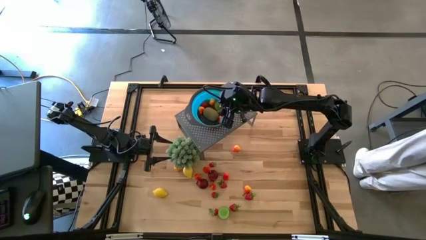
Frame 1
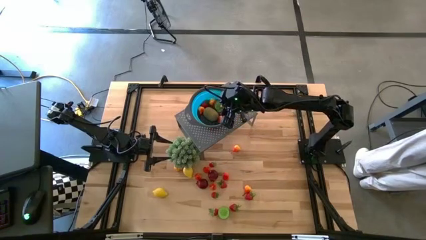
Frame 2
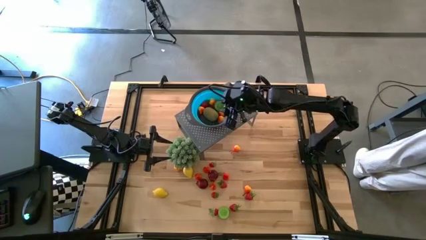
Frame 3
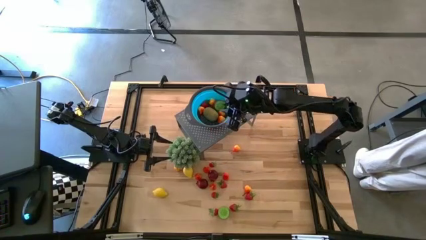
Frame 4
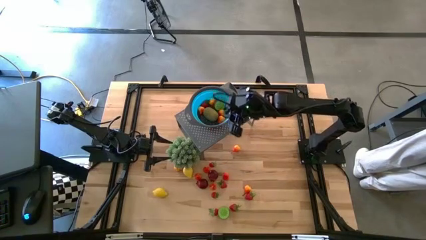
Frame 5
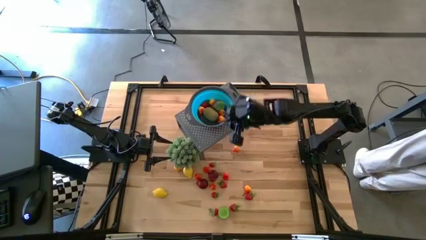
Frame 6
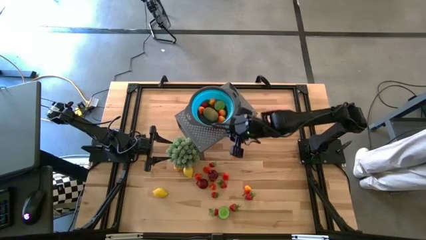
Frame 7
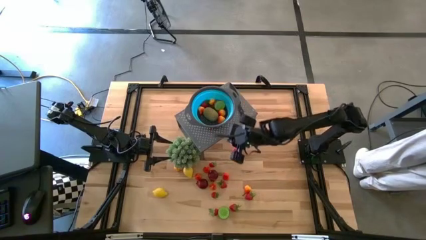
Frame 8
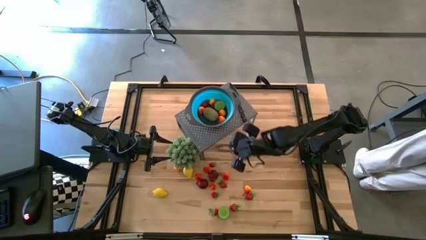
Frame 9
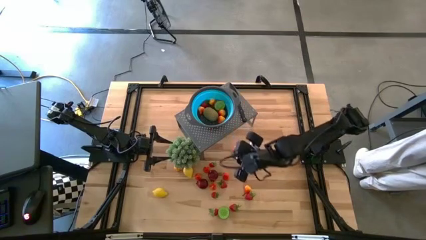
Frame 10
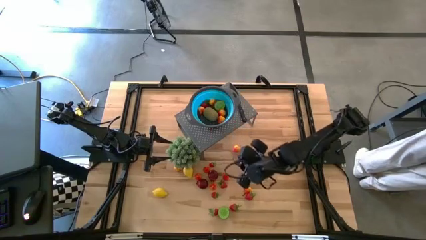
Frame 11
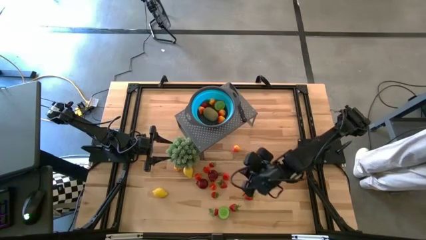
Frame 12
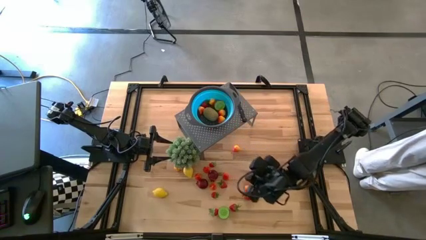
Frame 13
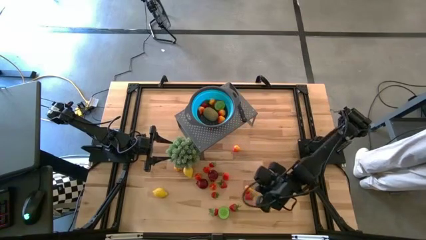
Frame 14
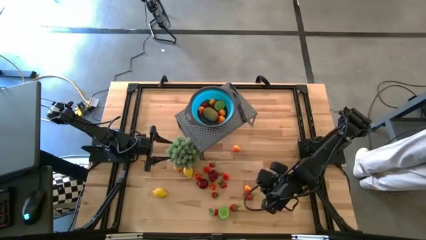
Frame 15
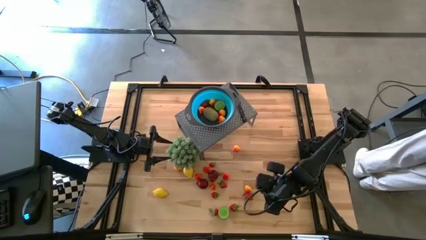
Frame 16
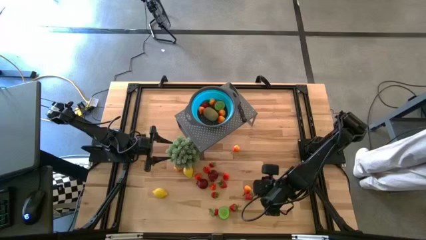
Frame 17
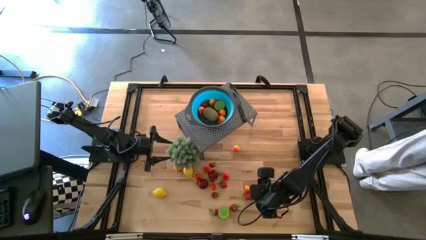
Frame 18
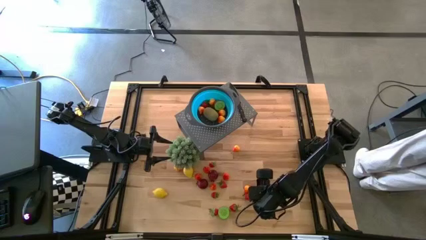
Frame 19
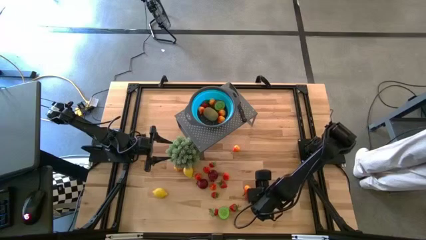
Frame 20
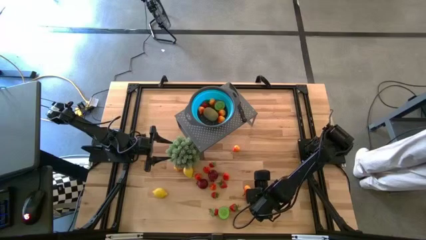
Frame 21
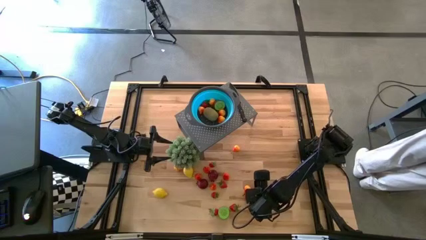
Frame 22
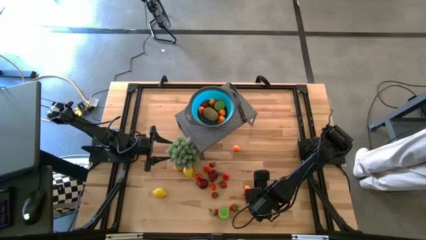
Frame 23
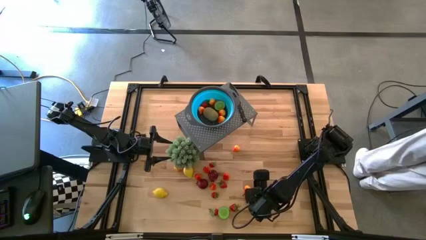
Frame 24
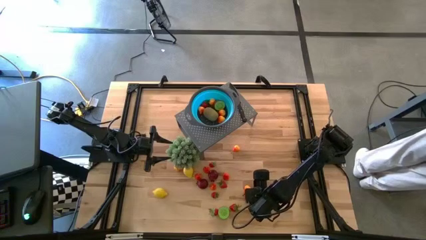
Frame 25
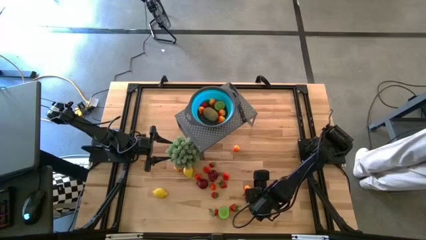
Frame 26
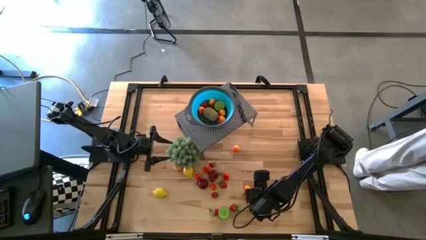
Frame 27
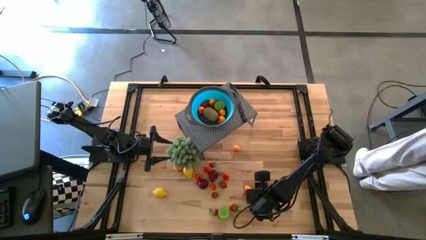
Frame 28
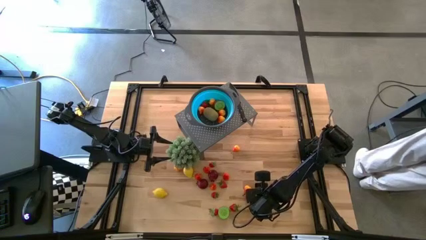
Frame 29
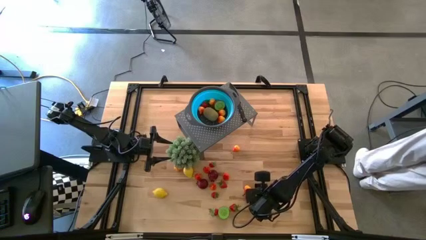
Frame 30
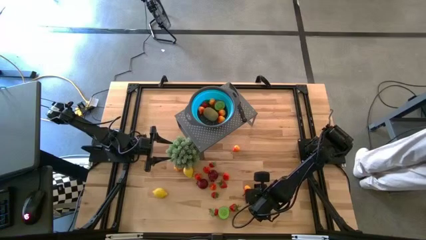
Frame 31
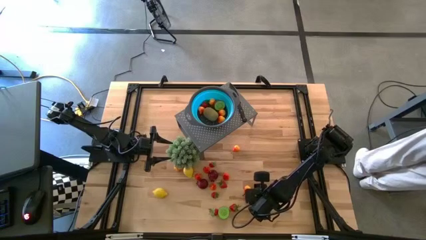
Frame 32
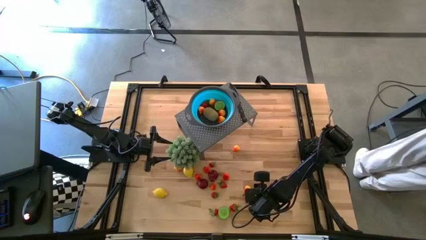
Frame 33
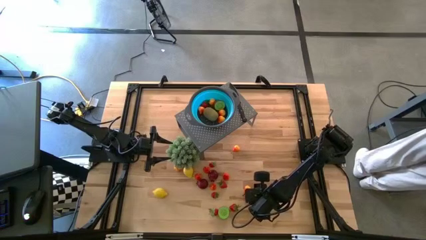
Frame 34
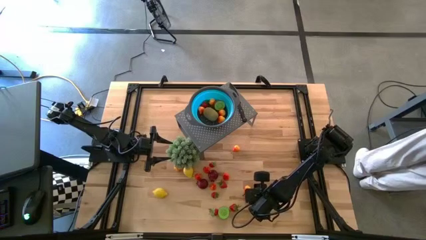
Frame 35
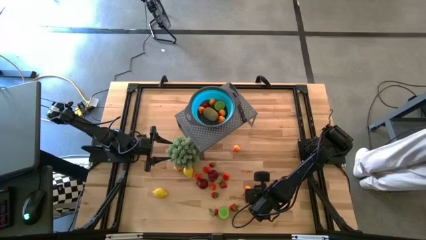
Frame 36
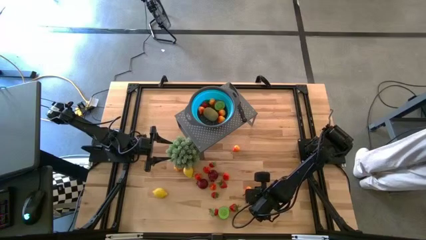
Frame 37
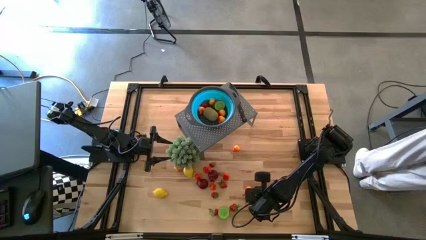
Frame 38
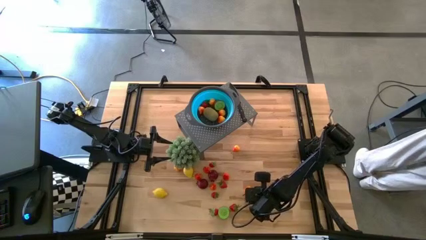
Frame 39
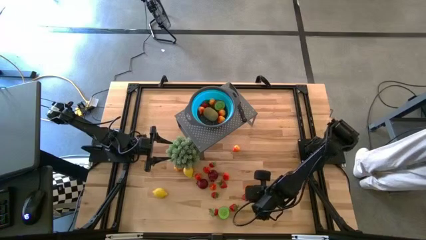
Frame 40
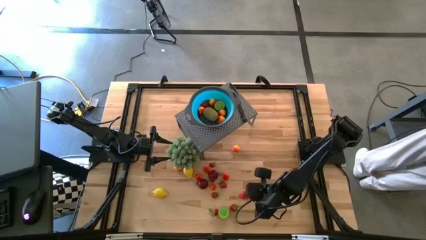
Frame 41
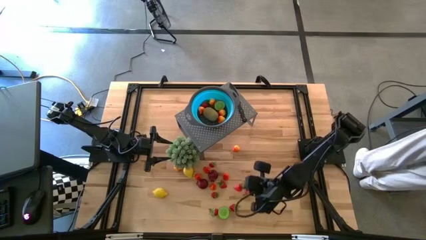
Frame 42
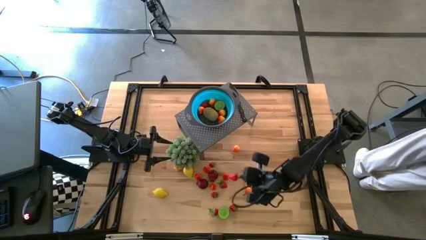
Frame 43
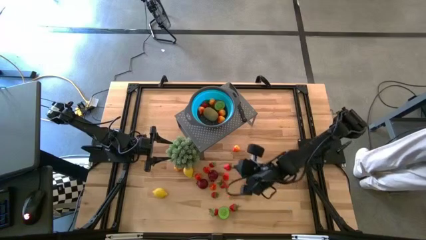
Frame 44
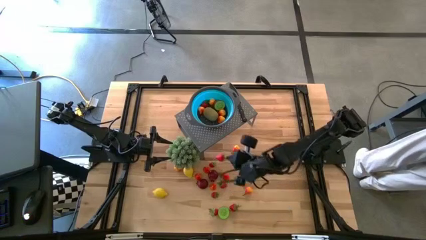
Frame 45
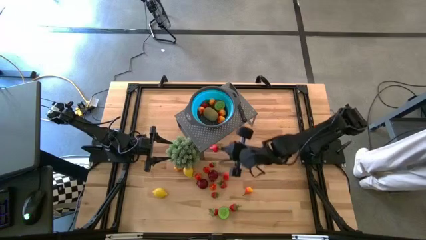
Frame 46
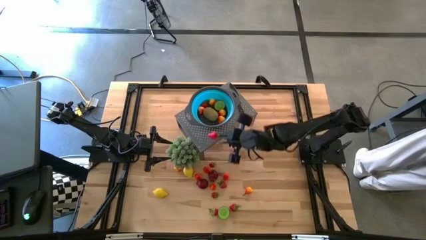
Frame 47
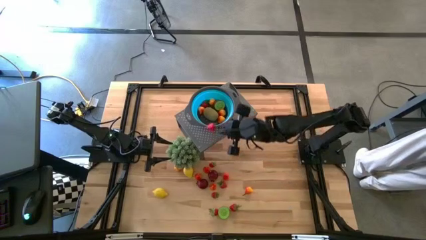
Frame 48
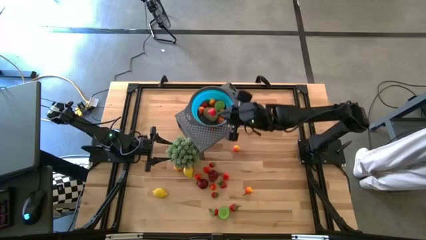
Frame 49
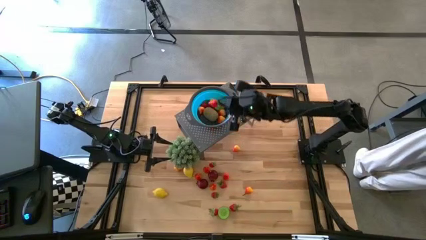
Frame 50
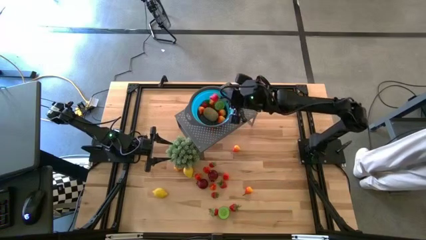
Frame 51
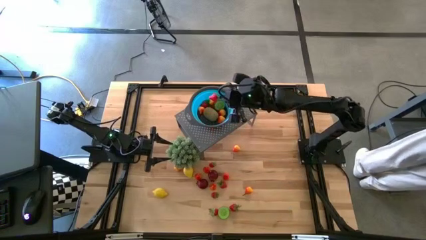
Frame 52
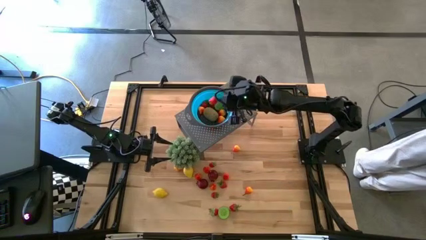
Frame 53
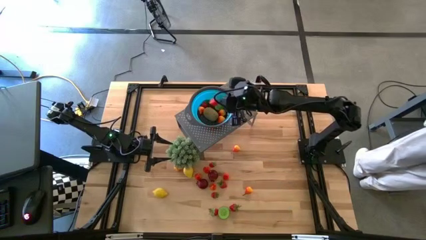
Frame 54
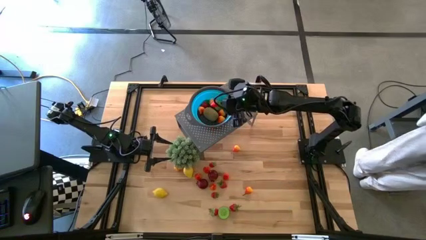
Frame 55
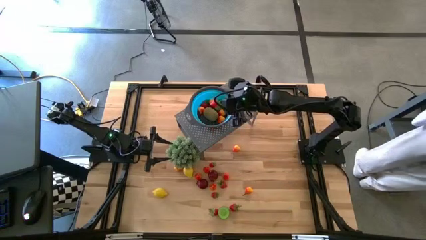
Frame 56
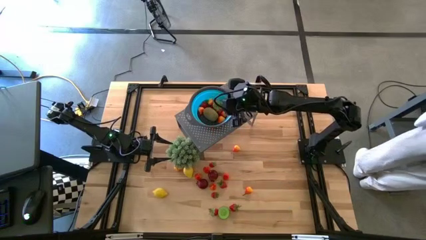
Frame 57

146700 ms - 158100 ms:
Task: Pick & Place Fruit
Put the strawberry into the blue strainer bowl on the shelf
